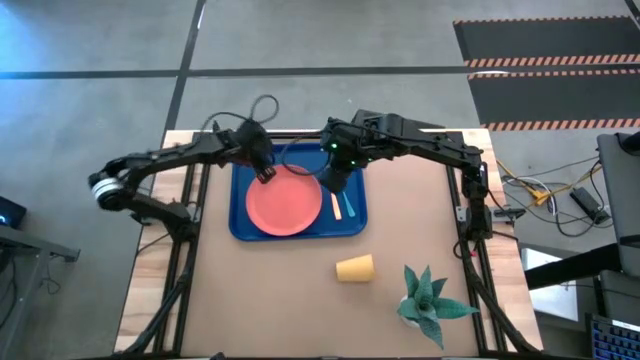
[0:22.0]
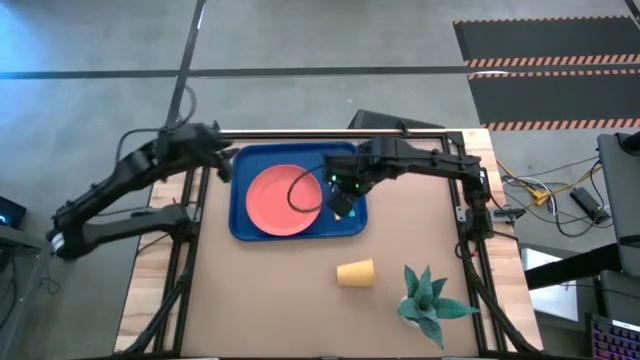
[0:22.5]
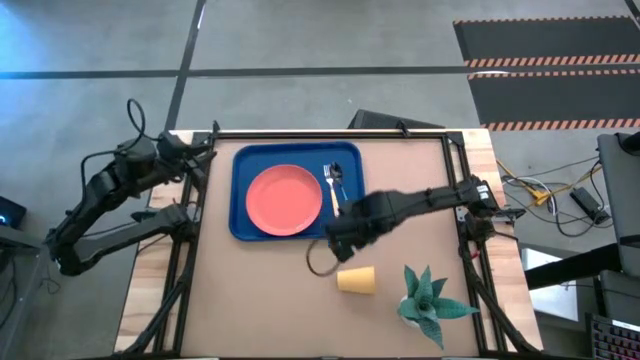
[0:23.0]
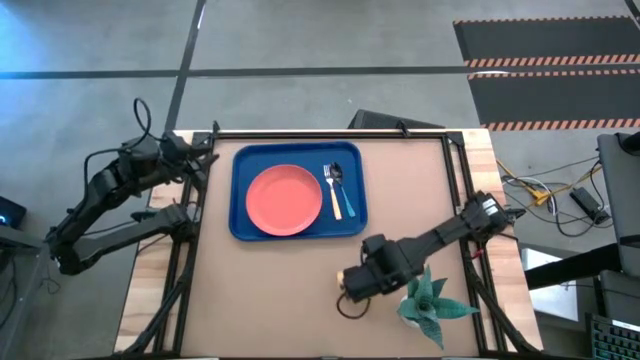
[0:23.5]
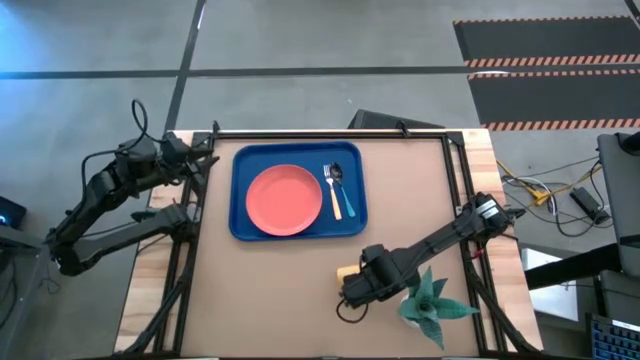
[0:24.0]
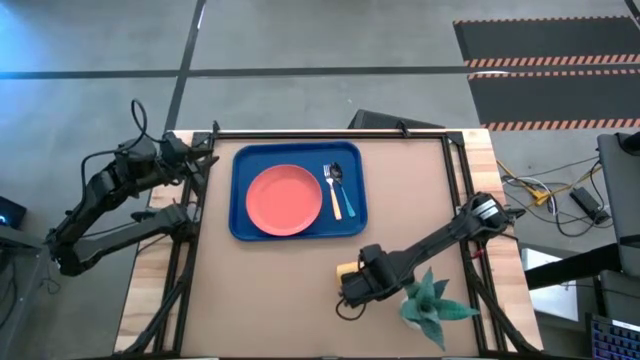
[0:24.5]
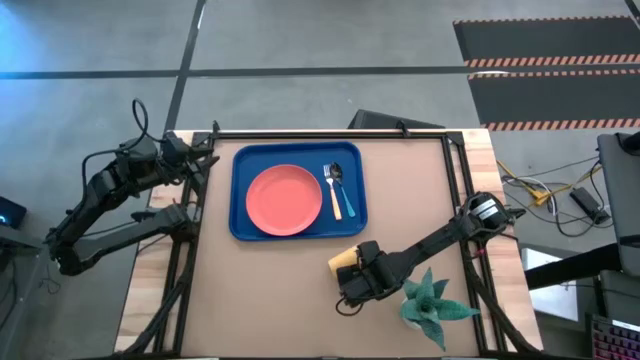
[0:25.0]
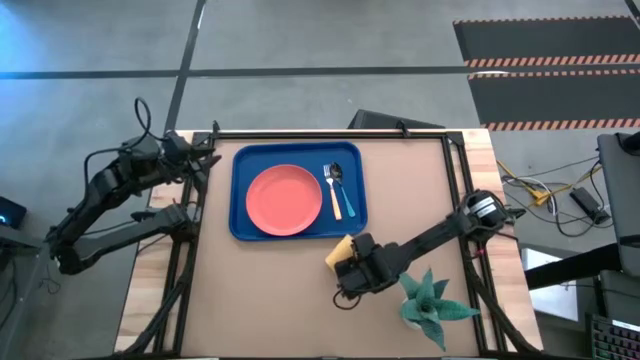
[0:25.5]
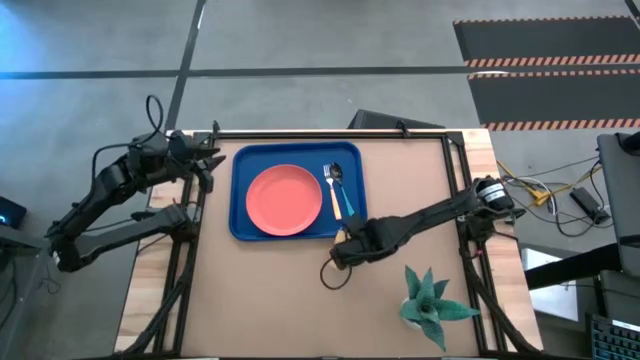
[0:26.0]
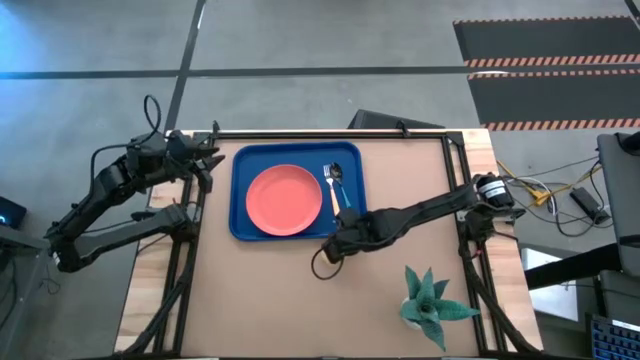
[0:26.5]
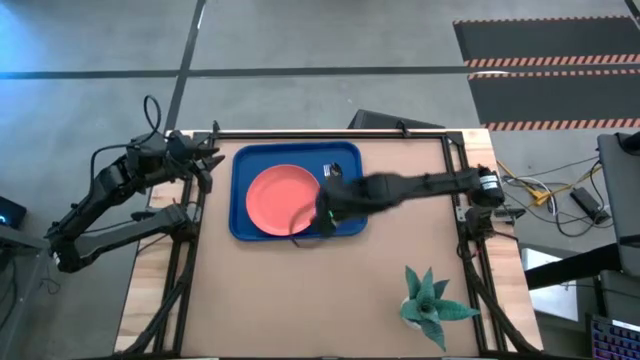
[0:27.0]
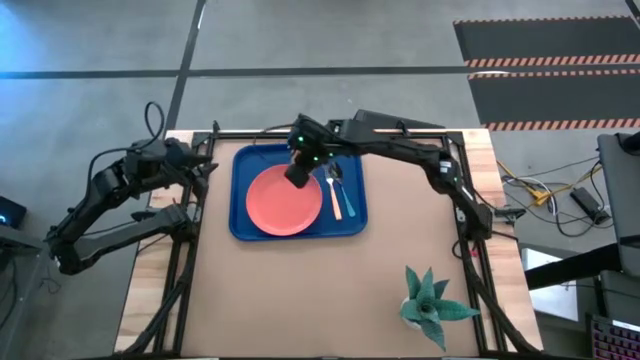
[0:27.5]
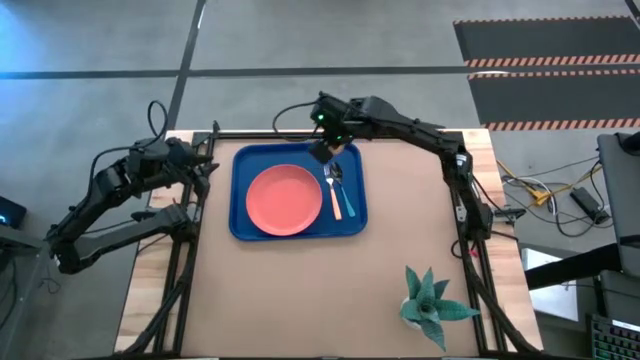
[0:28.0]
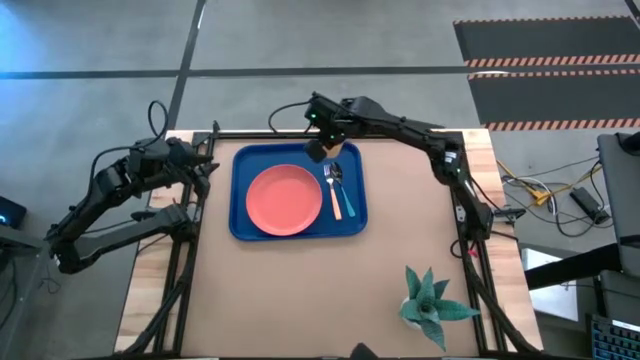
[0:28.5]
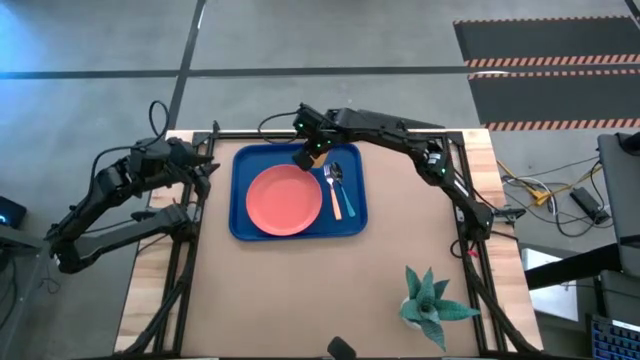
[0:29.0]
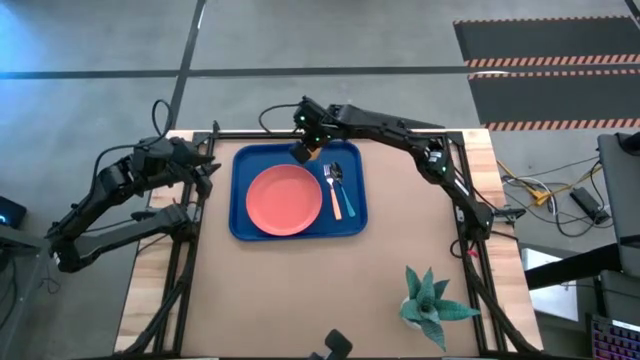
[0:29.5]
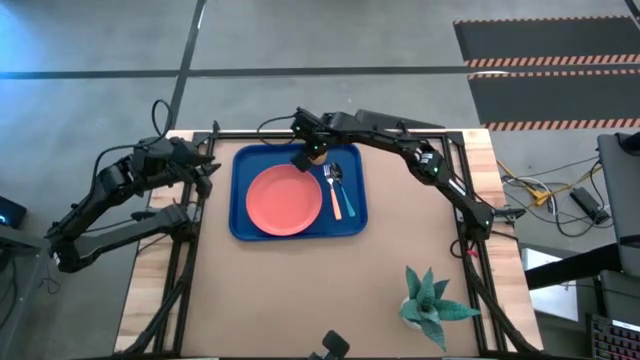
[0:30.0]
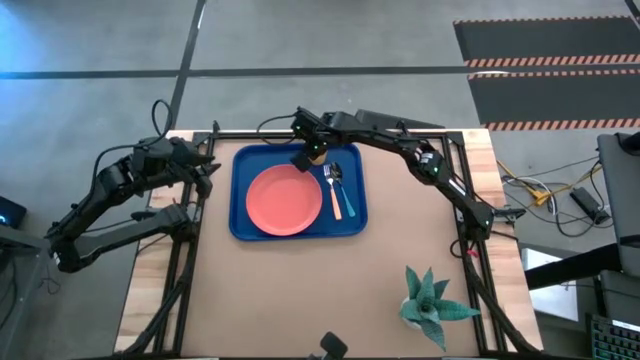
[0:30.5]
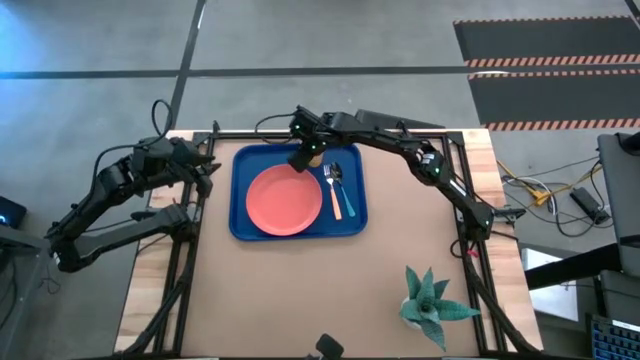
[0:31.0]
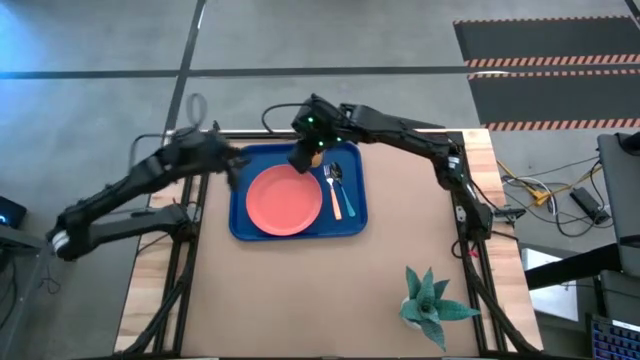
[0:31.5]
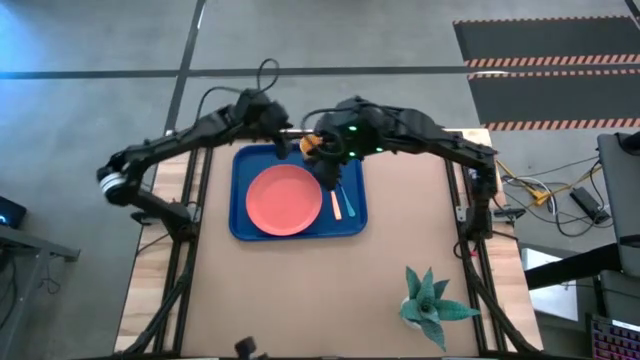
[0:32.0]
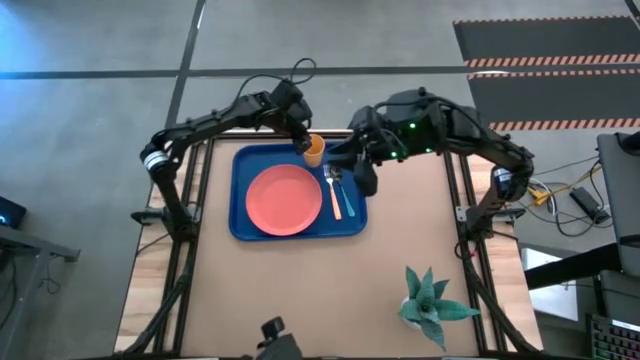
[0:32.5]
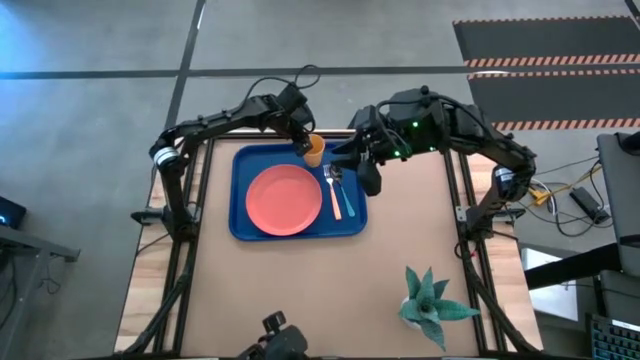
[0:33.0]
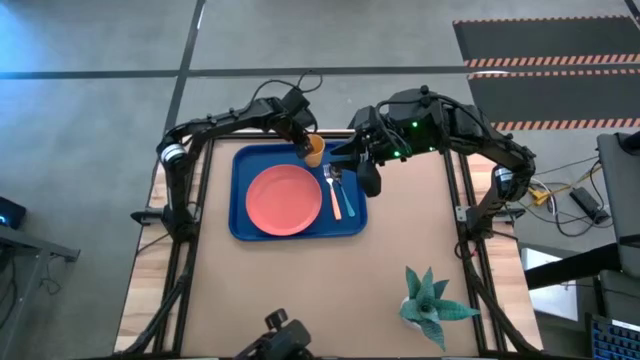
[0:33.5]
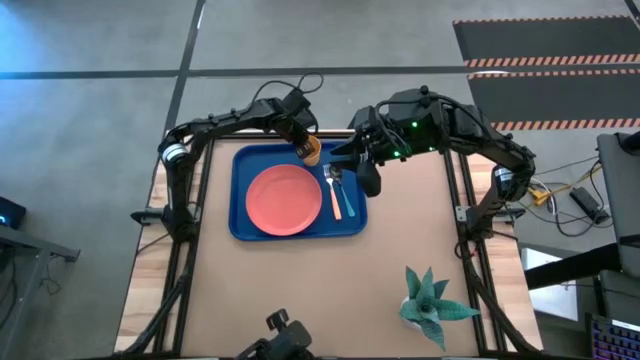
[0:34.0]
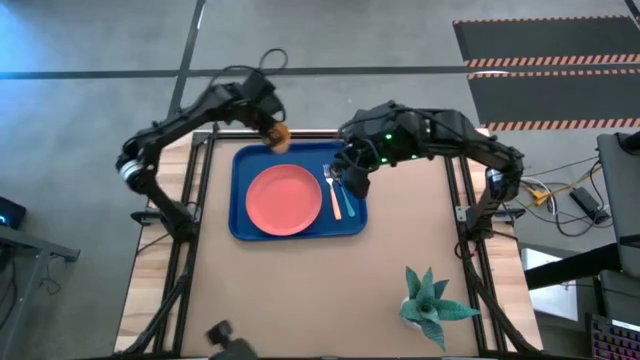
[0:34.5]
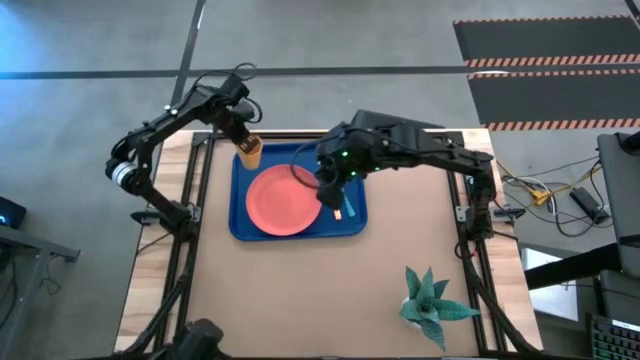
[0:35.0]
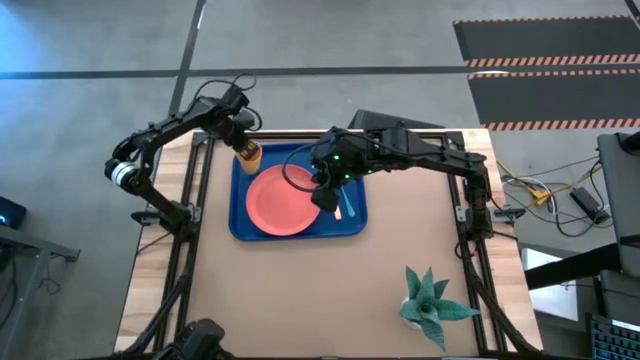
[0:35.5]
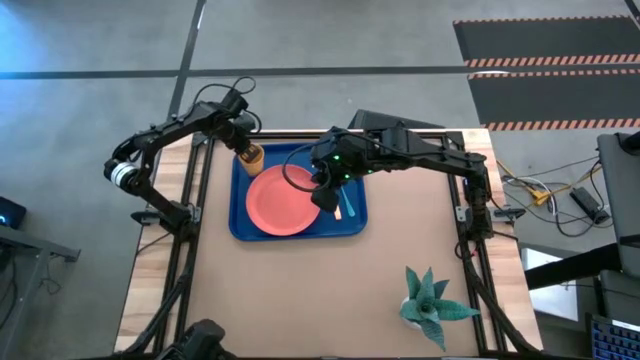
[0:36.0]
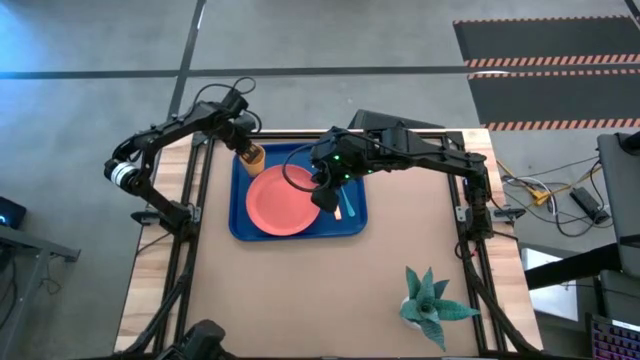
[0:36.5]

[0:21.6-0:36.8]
Task: Pick and place plate/cup/fork/spoon on tray
Put the yellow cup to the top left of the orange plate on the blue tray

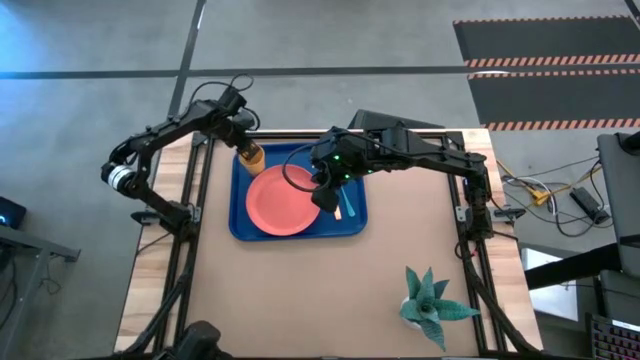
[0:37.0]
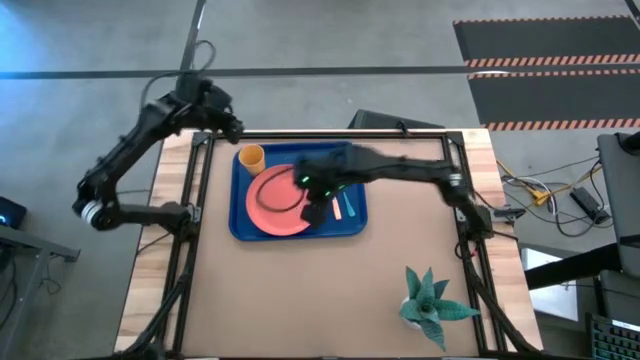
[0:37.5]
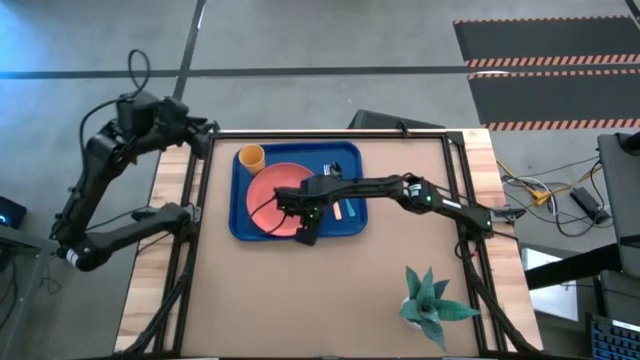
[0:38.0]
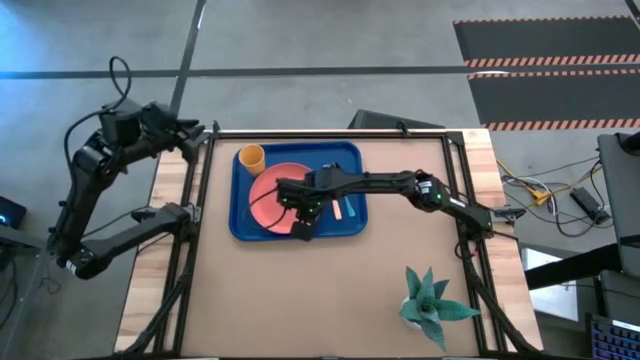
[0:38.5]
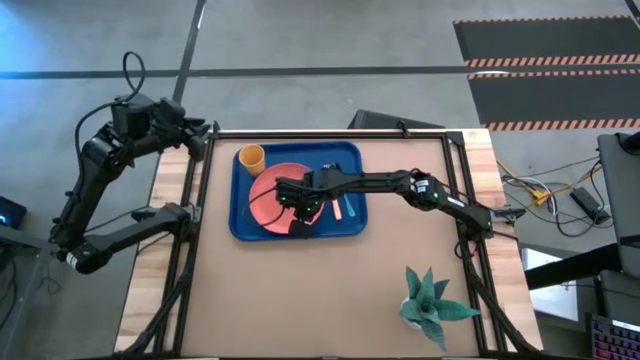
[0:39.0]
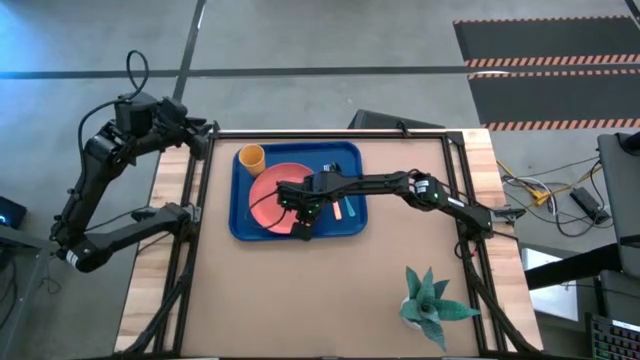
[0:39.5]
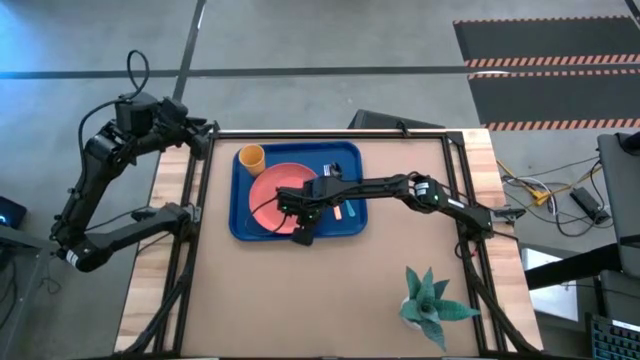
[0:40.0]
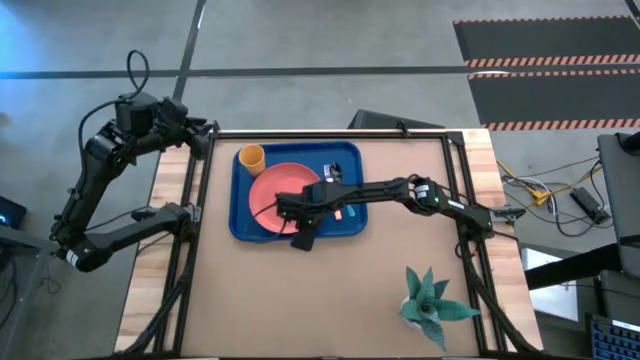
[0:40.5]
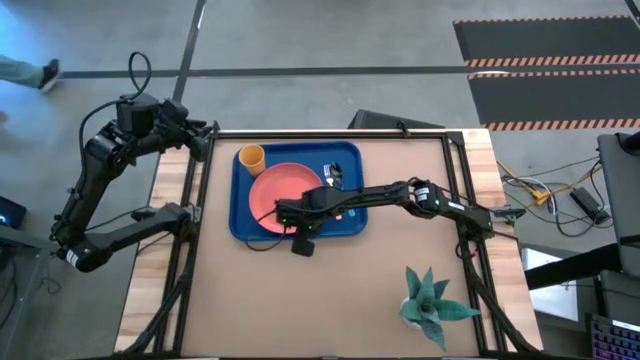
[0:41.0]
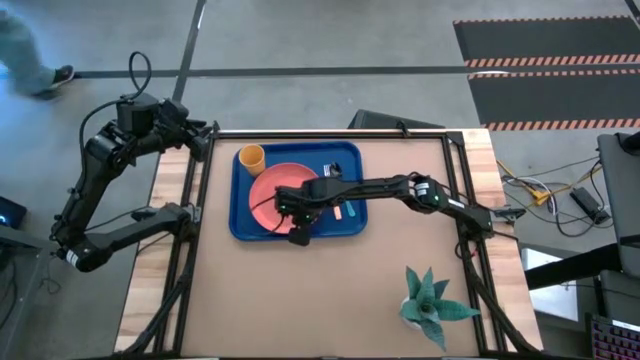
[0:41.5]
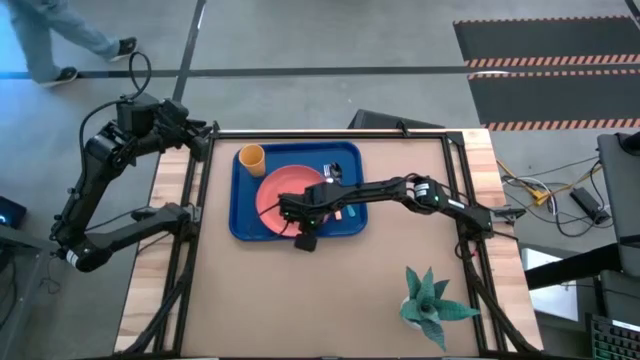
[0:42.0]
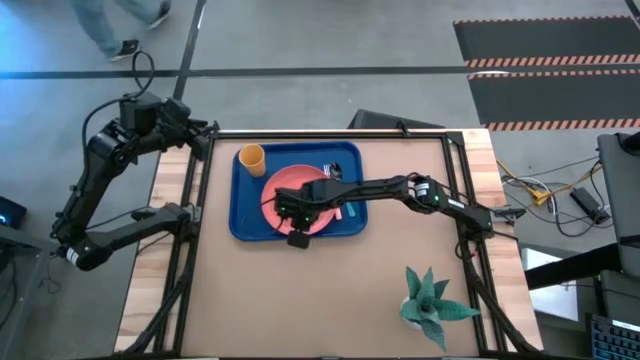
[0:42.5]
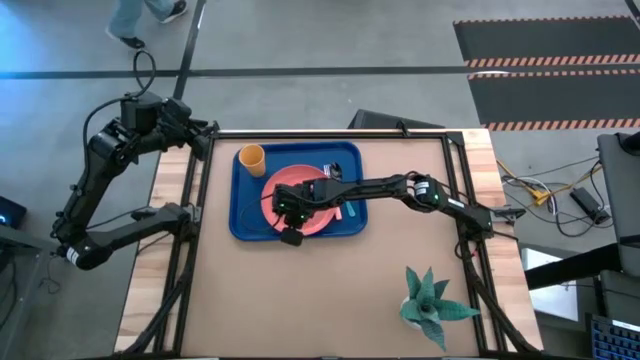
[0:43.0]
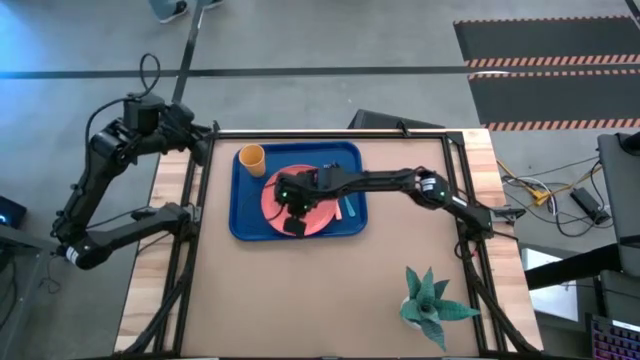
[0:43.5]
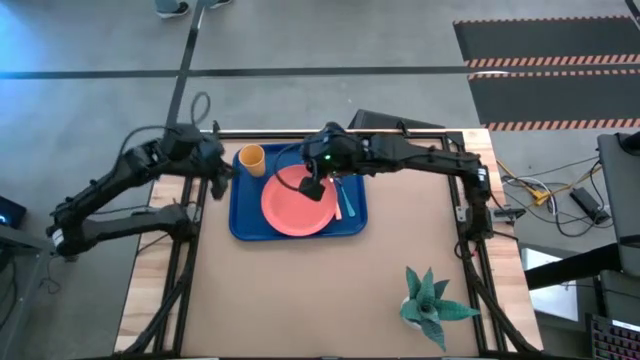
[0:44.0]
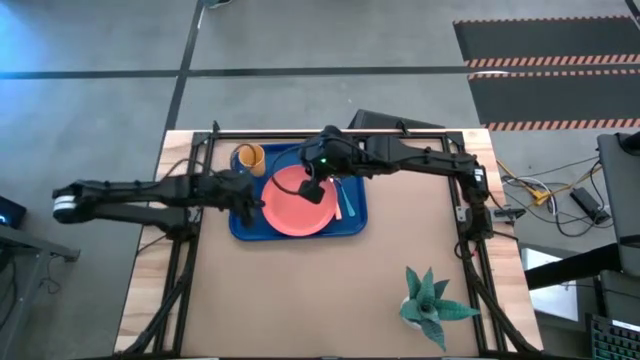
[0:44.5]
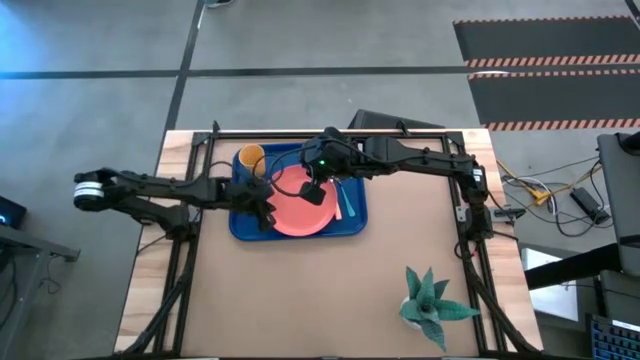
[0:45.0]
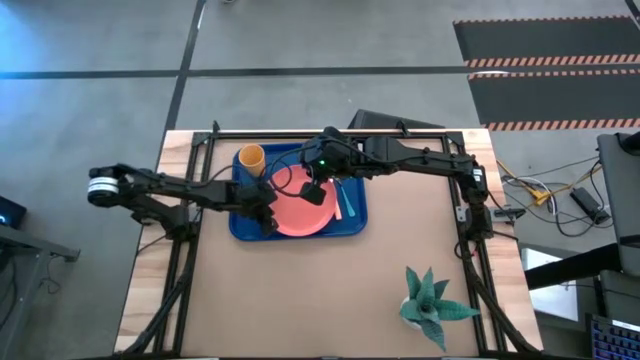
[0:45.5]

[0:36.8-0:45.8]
Adjust the orange plate on the blue tray
